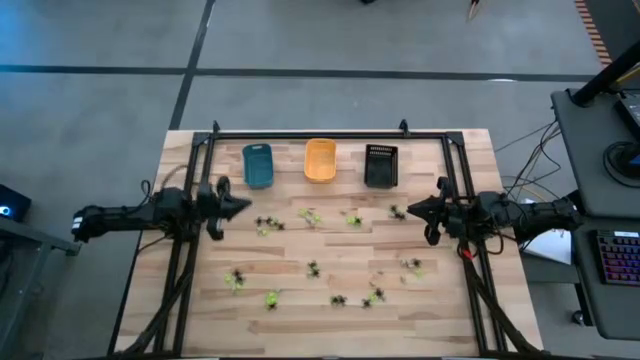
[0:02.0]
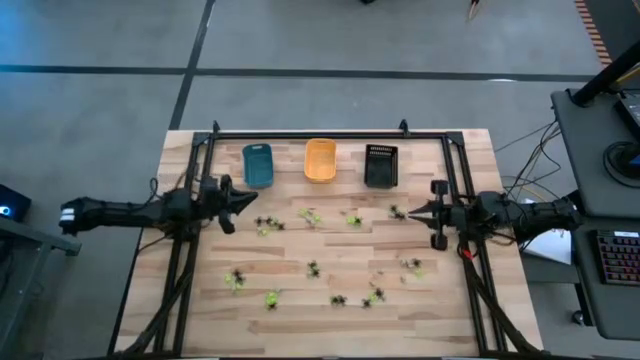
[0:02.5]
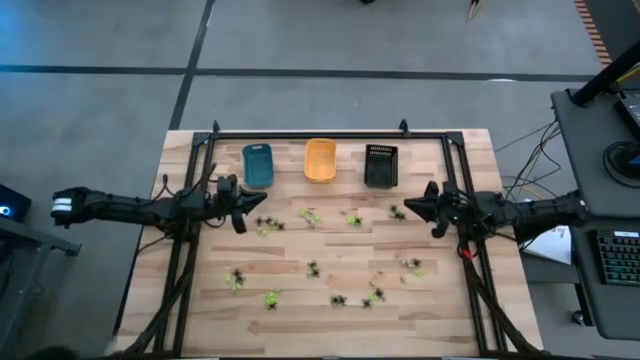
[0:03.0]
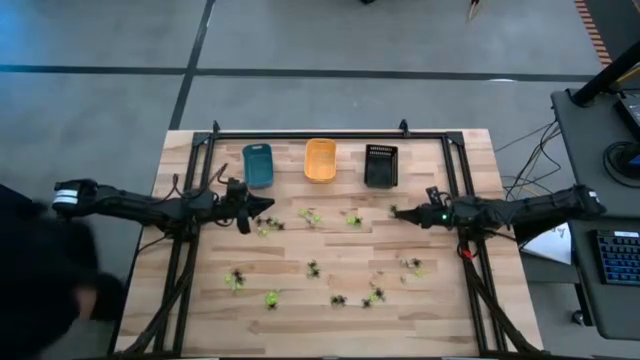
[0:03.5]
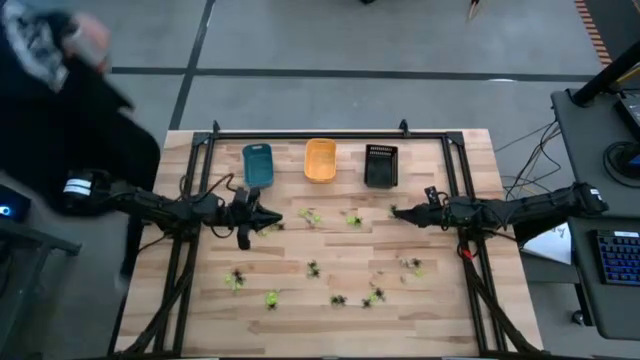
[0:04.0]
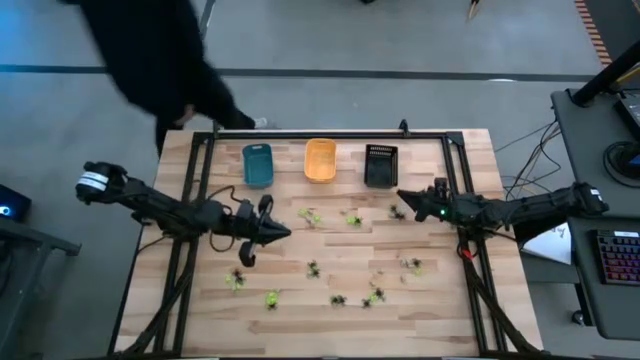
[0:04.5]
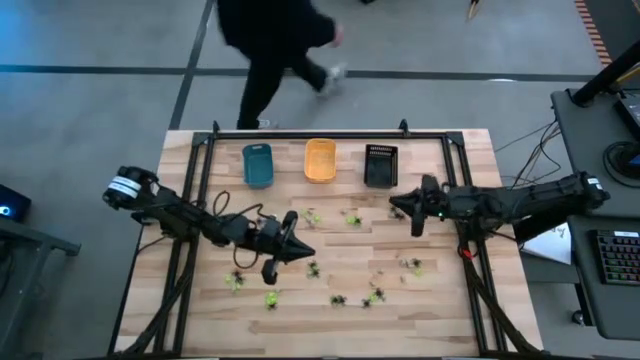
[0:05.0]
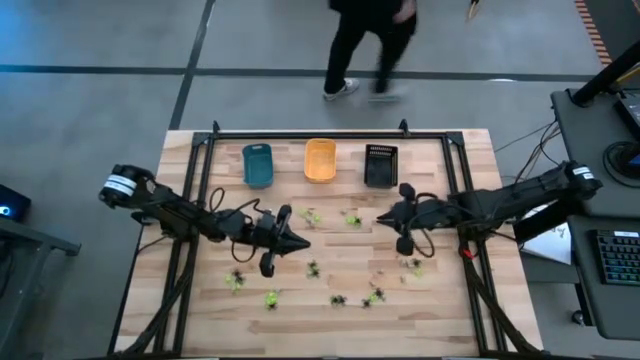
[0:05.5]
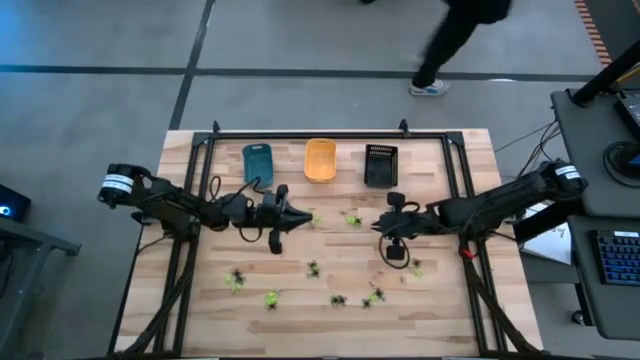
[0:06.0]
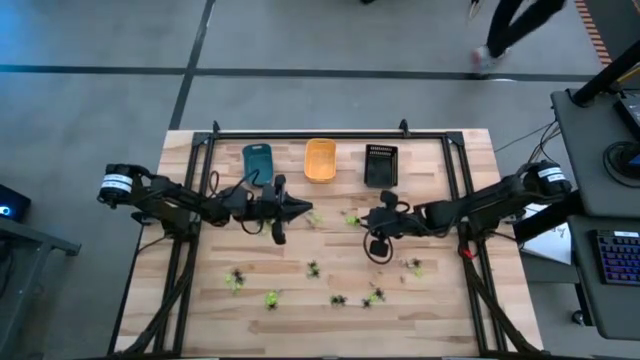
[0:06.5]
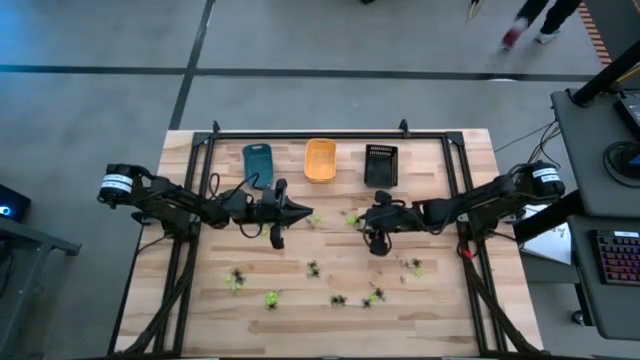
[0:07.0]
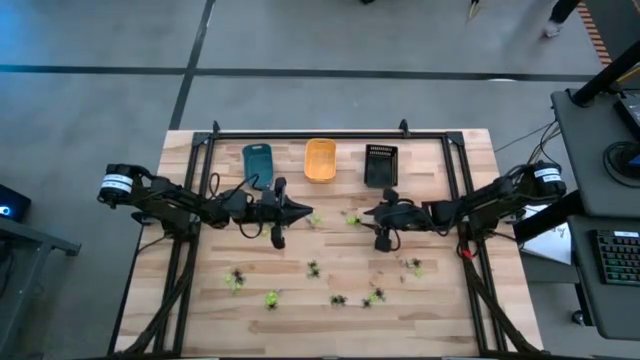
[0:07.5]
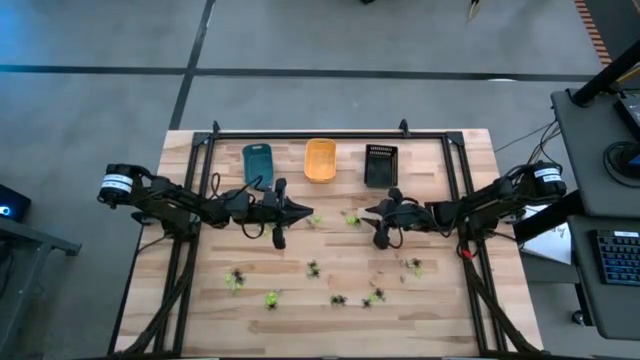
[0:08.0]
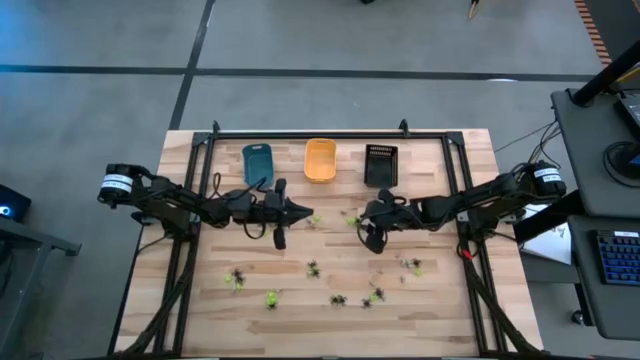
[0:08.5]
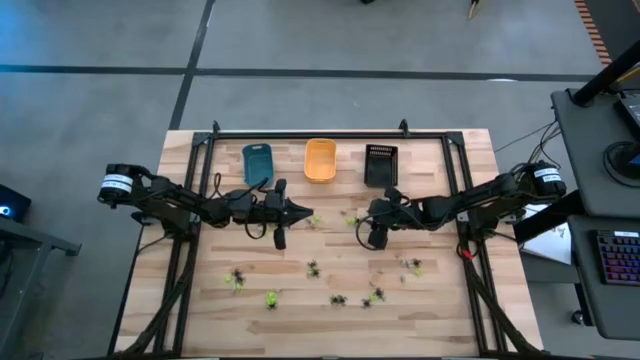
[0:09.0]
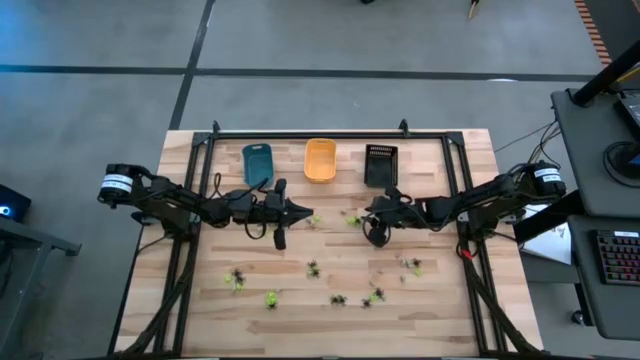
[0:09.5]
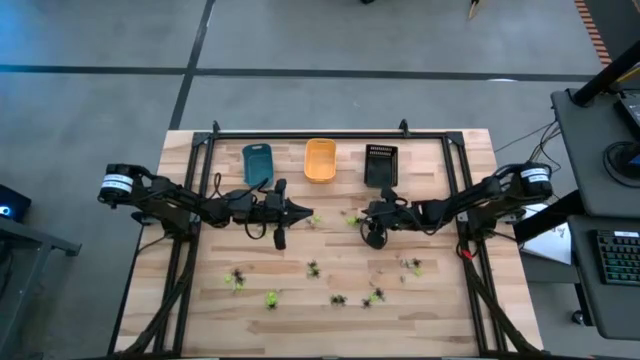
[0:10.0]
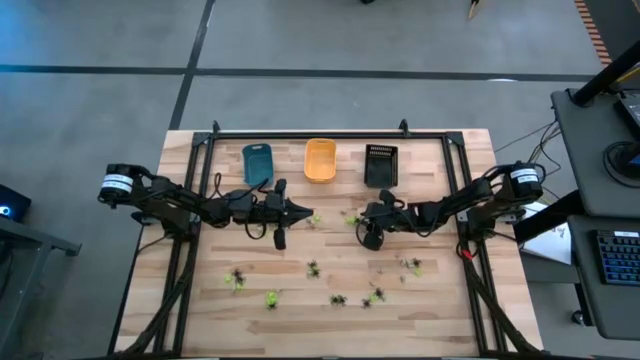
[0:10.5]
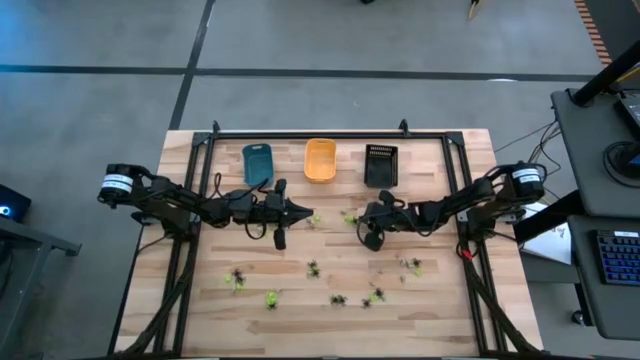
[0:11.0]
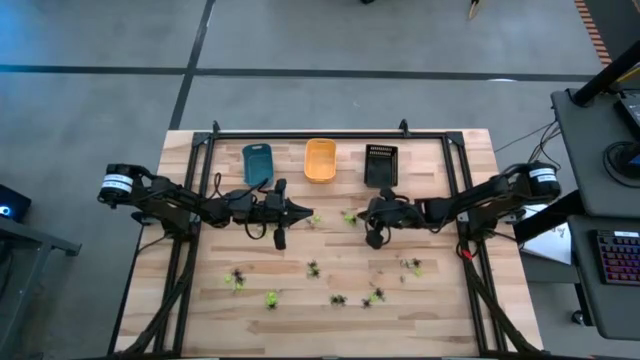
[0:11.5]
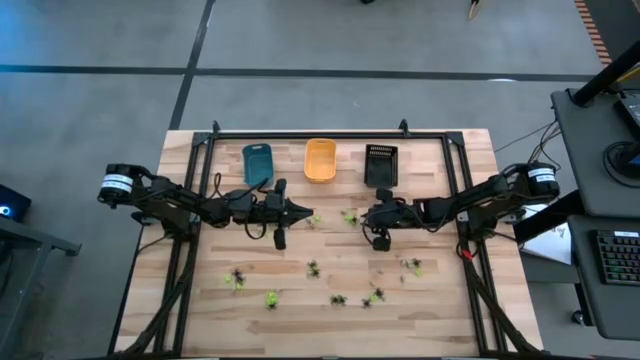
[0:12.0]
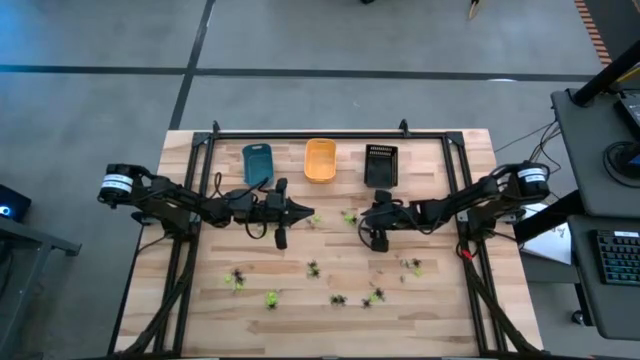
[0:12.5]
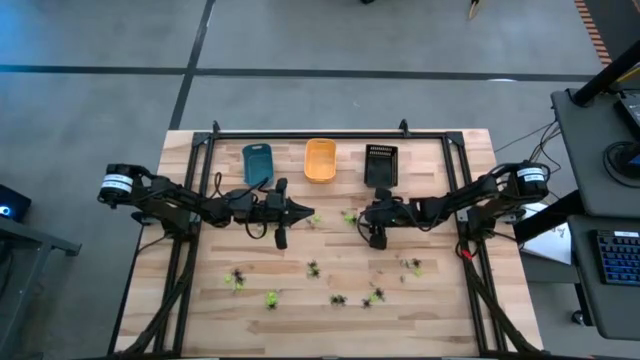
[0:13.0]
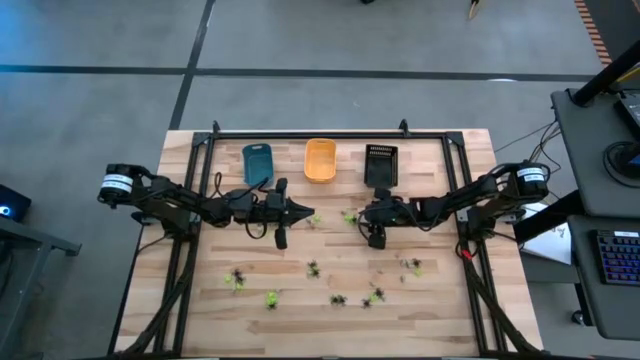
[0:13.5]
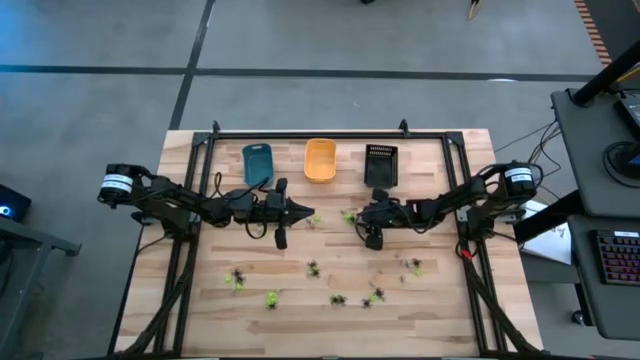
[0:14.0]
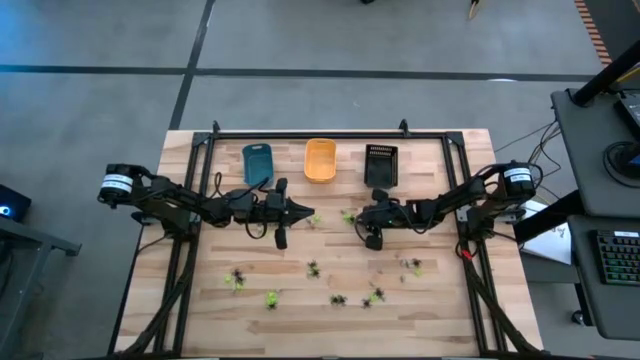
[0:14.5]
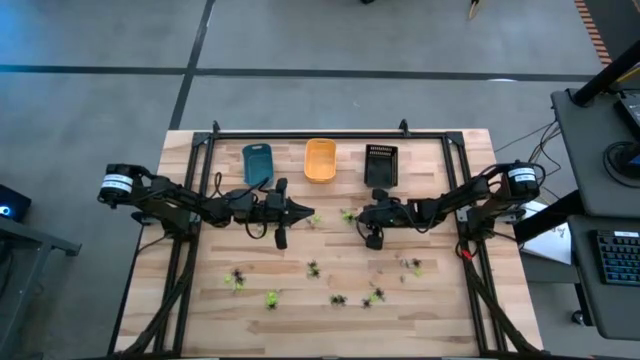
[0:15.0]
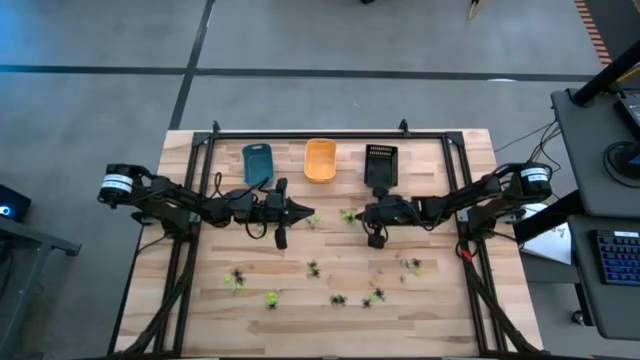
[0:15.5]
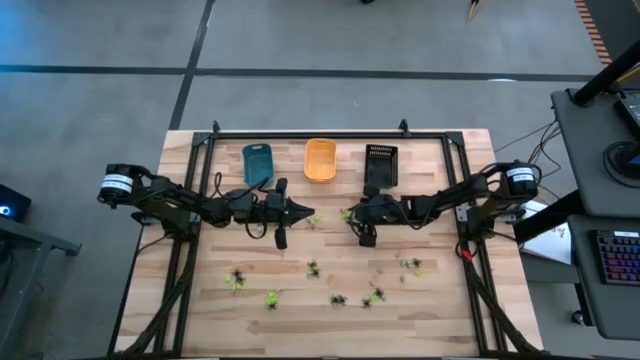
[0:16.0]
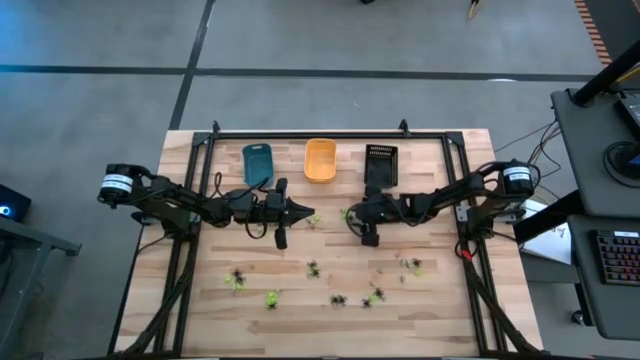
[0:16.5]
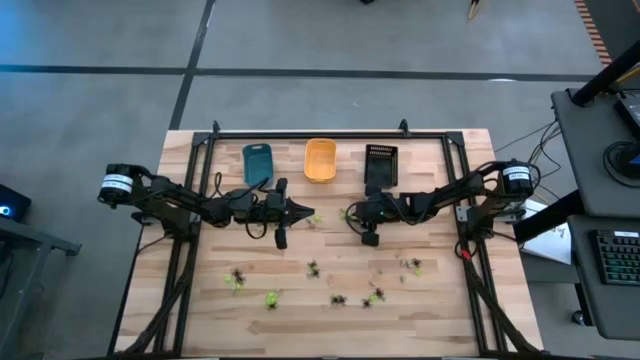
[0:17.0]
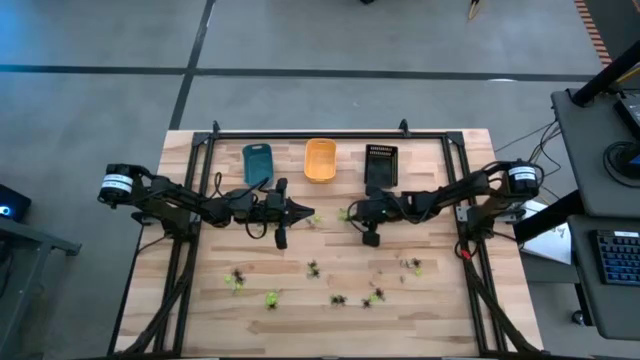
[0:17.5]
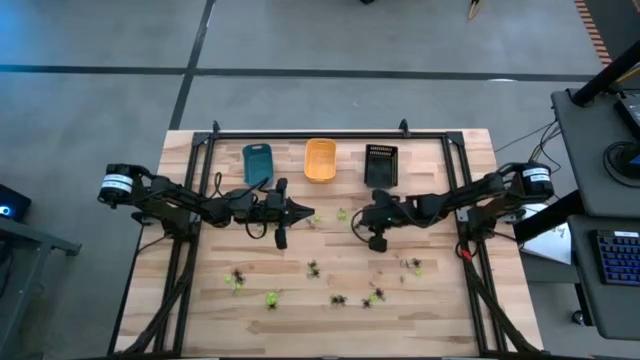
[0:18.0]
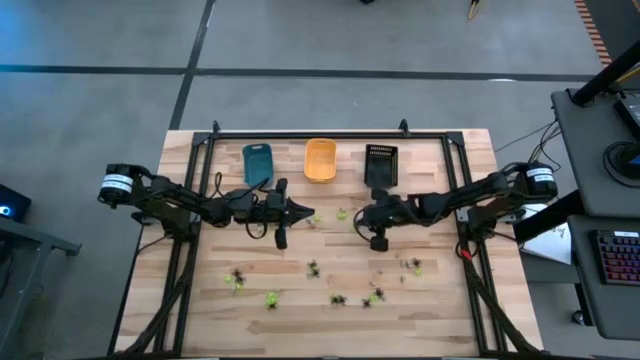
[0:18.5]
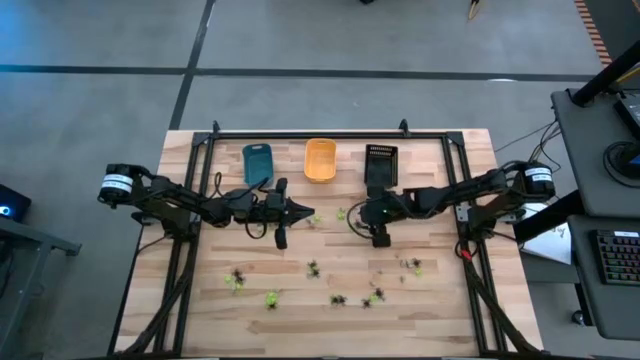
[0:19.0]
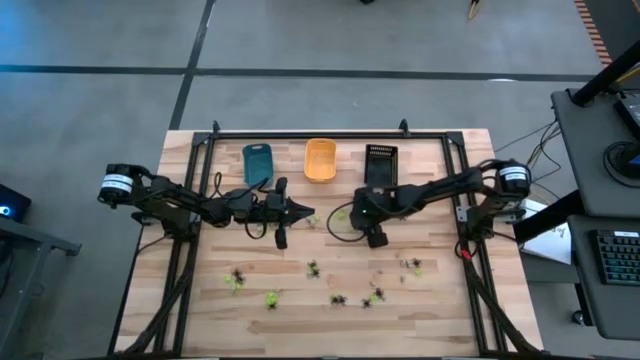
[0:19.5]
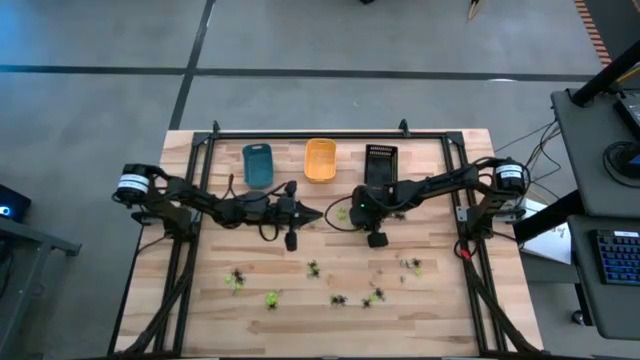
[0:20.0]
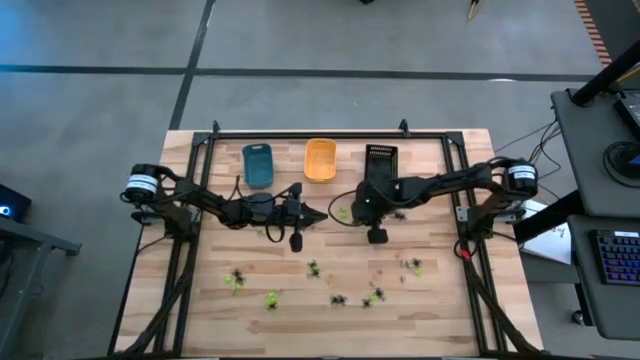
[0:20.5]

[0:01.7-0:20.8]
Task: Sort Halloween decoration
Put the black spider toy into the orange bin
